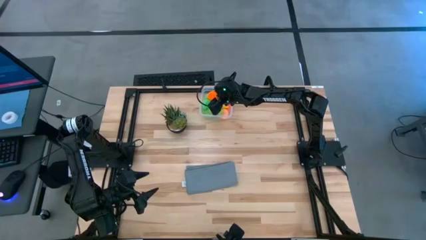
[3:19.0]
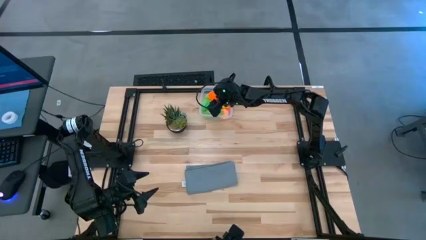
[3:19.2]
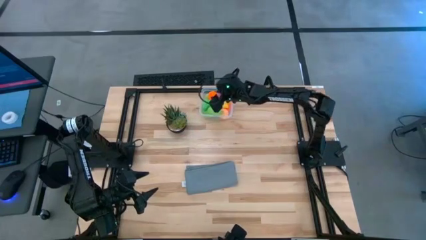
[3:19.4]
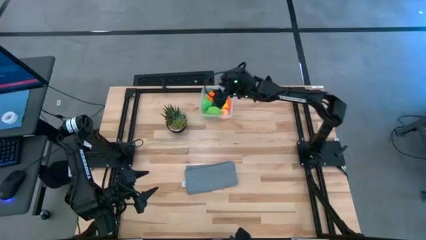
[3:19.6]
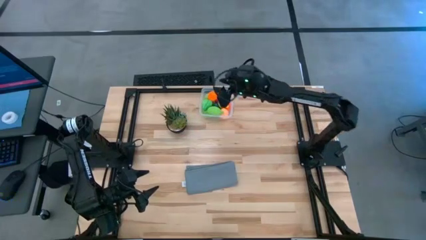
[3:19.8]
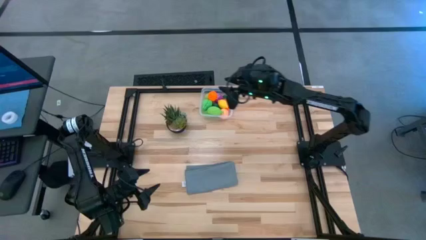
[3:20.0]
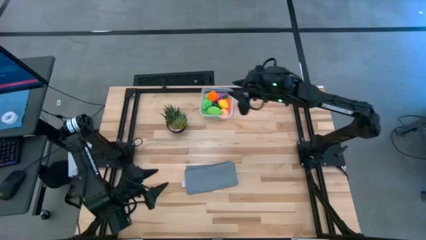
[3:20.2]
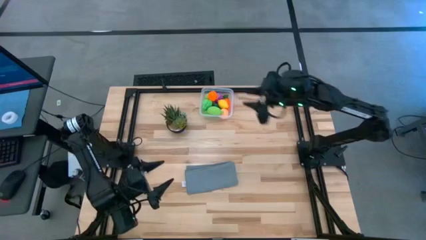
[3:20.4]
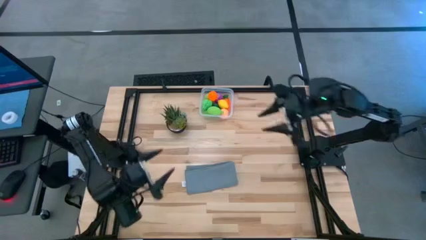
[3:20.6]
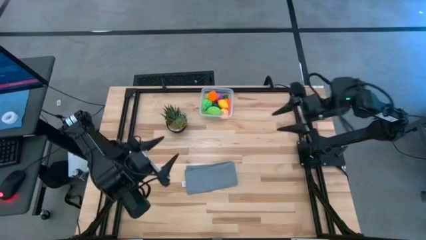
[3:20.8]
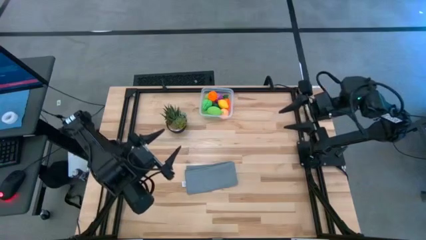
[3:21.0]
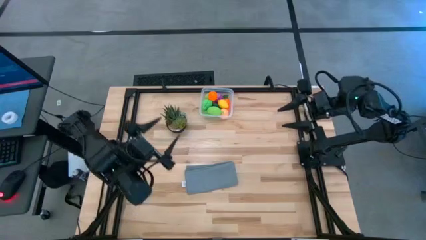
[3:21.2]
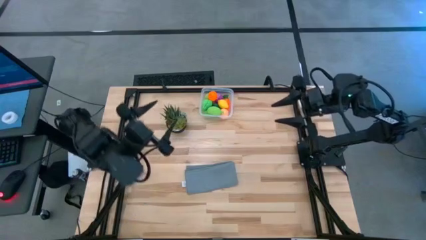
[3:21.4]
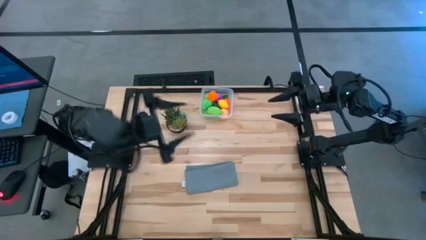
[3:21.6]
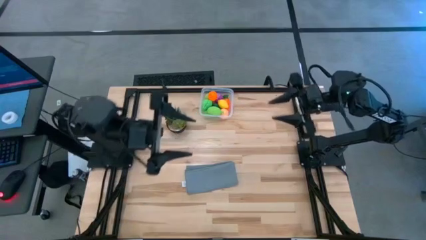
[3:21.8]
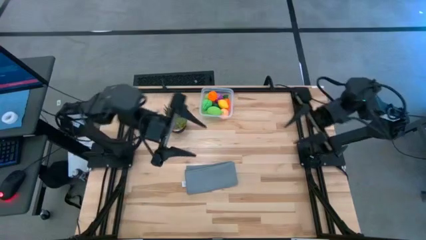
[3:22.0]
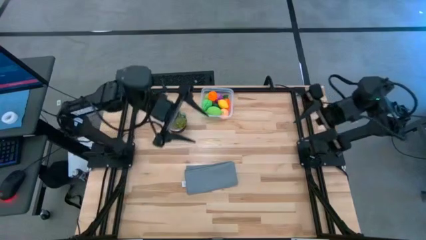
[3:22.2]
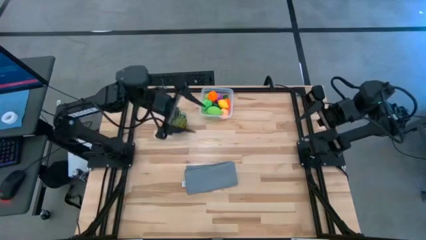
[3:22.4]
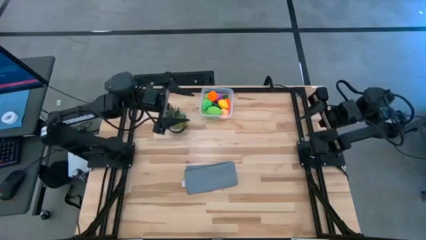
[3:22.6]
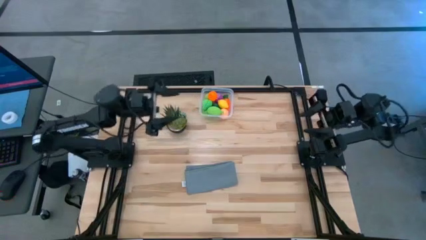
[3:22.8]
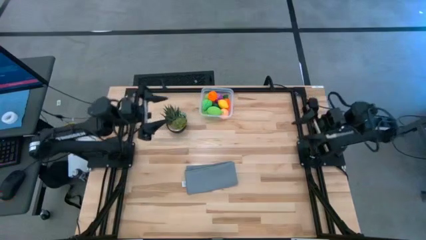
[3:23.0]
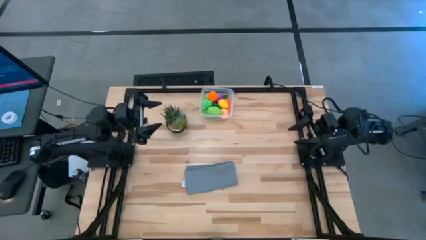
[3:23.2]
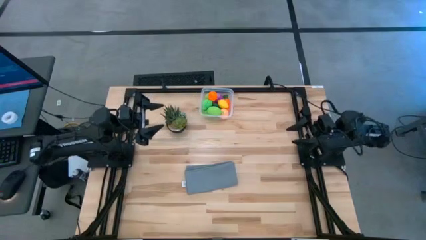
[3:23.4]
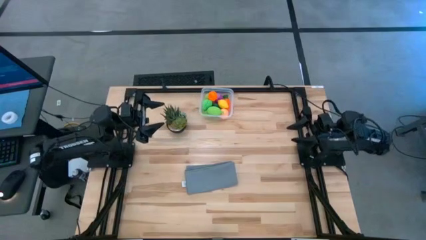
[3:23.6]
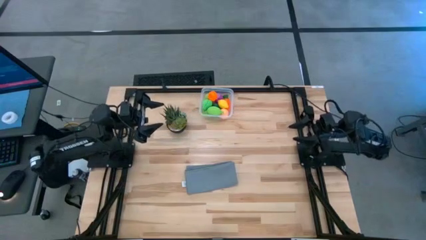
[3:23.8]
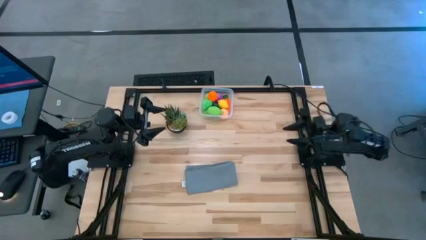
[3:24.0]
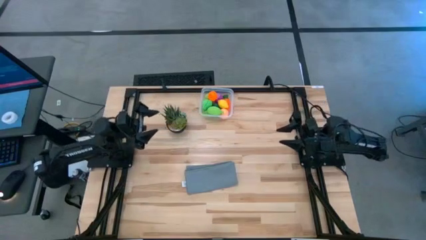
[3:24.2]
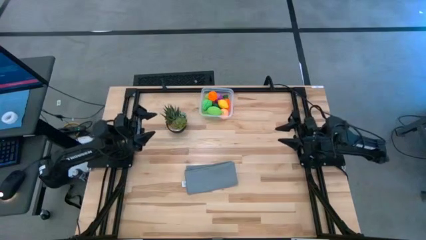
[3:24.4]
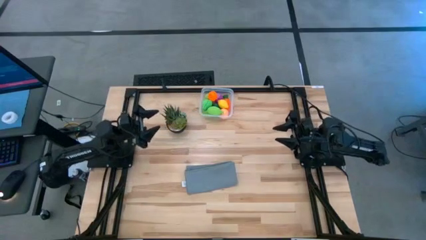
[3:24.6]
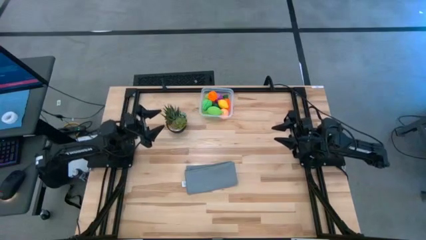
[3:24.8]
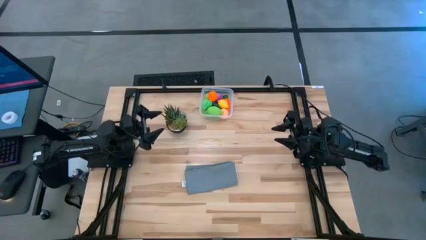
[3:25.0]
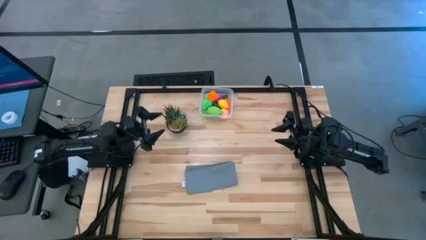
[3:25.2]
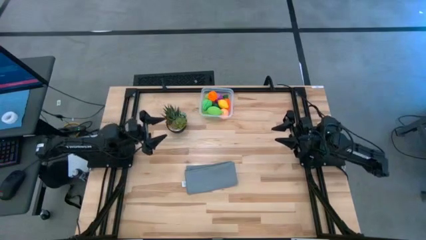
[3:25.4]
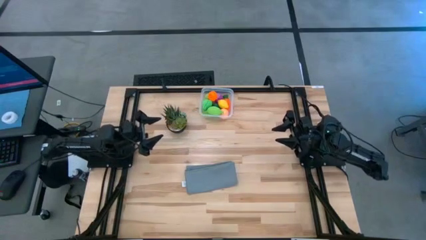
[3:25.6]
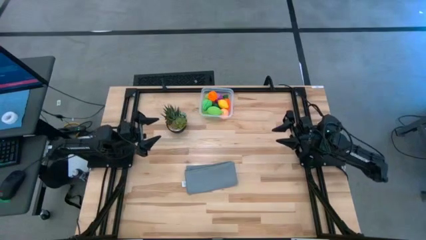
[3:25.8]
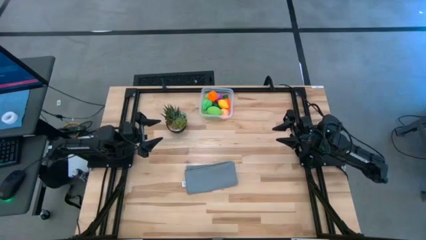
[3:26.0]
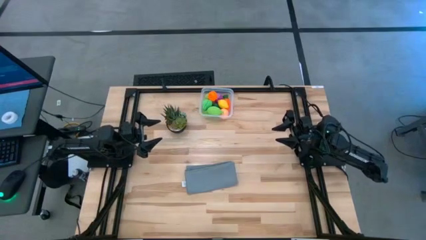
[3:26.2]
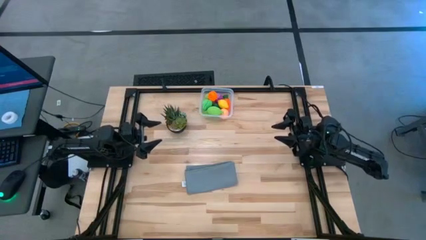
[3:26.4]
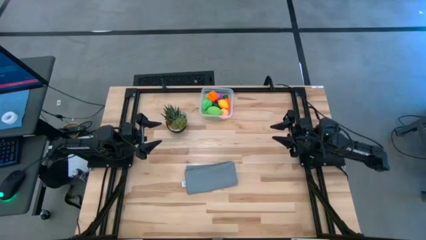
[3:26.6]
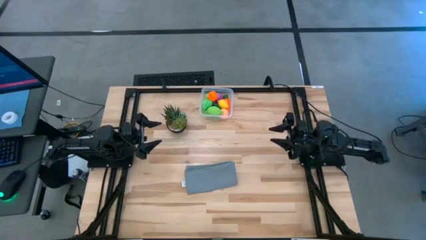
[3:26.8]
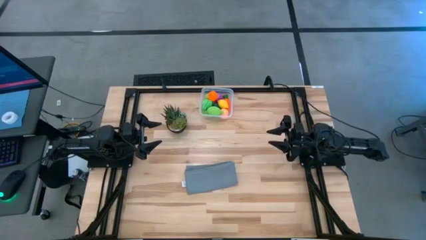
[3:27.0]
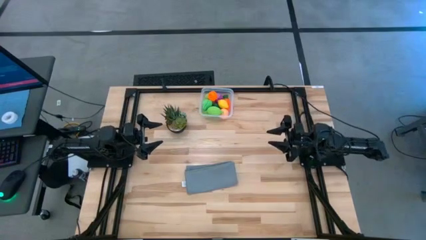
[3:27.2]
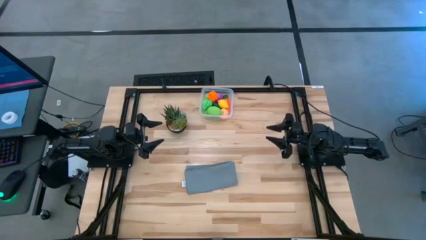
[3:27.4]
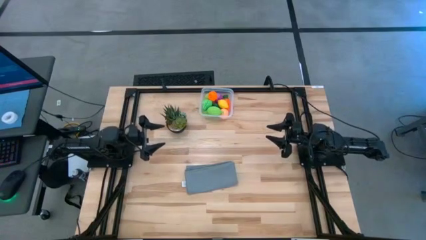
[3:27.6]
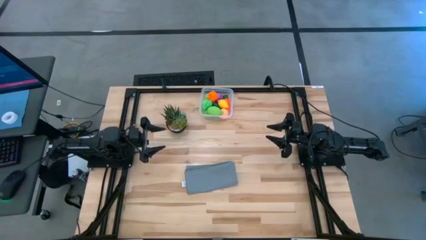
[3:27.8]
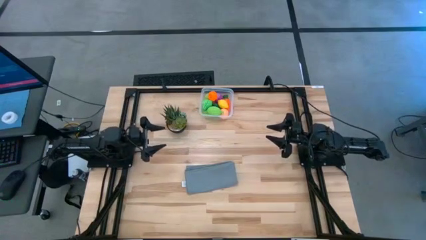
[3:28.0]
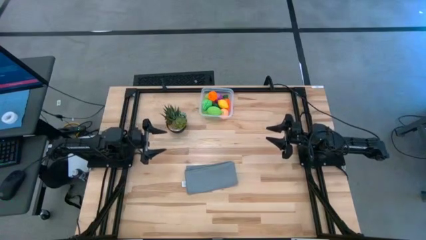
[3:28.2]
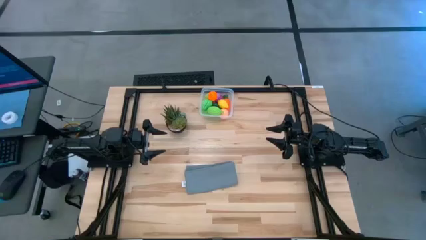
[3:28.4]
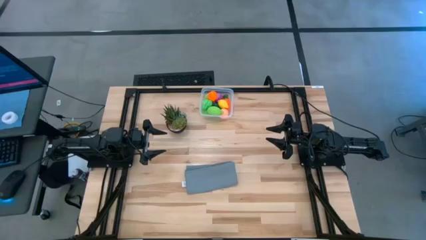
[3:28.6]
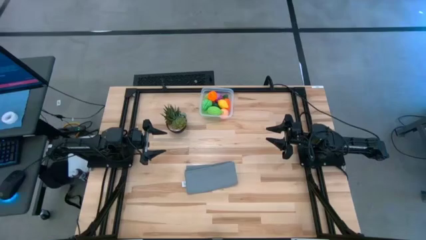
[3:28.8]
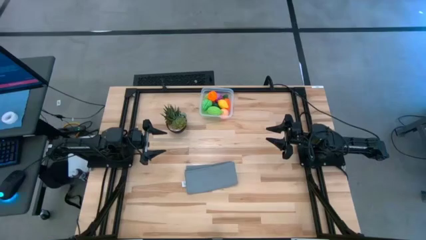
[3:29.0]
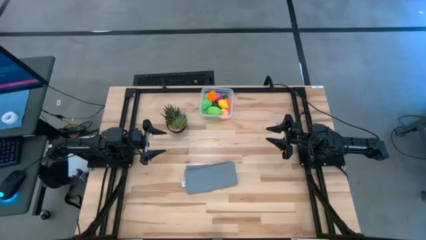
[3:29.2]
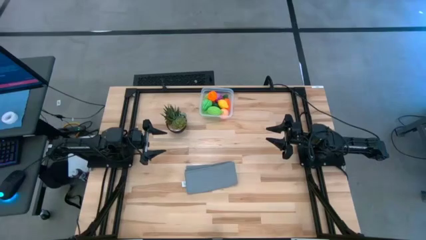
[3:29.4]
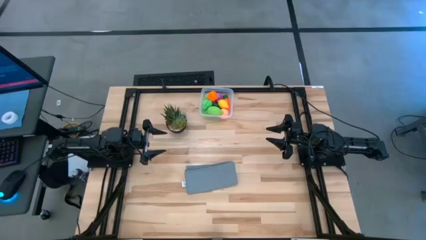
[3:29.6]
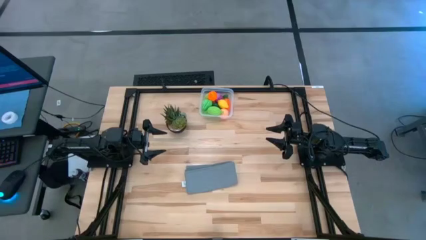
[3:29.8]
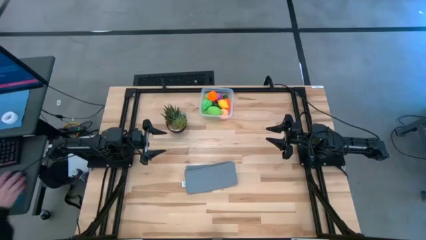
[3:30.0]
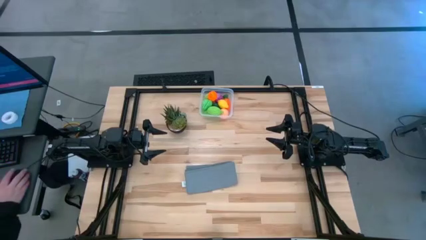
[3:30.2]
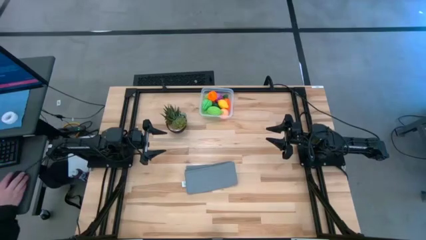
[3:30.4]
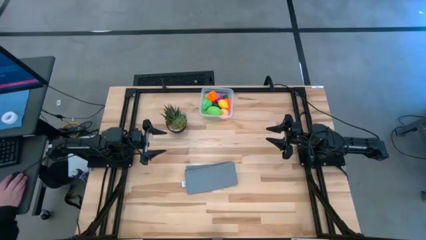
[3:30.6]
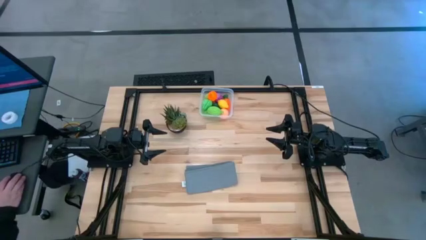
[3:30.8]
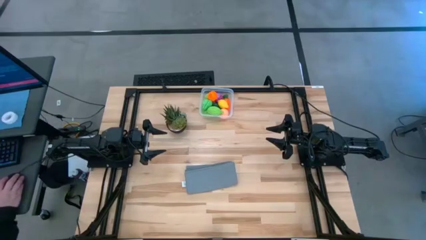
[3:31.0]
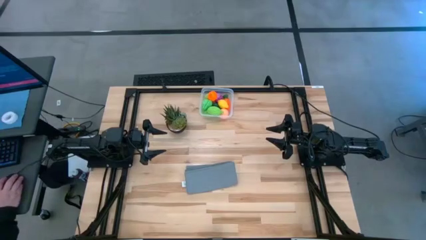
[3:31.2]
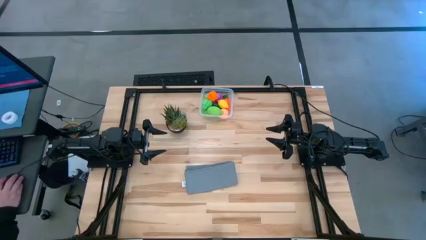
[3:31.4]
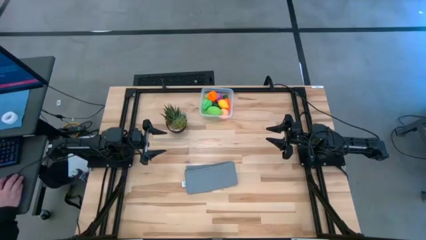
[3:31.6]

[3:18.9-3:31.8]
Task: Pick and placing Produce into tupperware
Return to Home Position

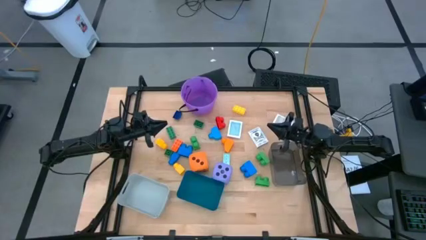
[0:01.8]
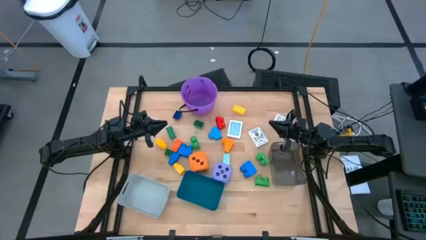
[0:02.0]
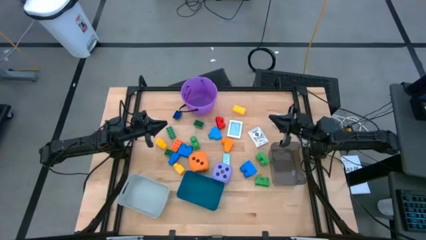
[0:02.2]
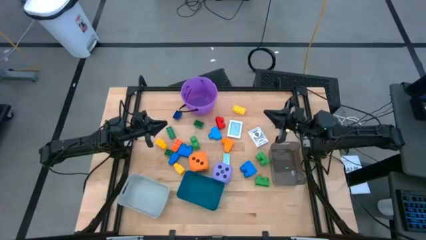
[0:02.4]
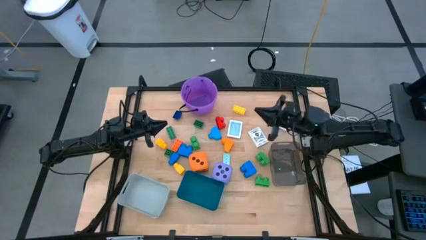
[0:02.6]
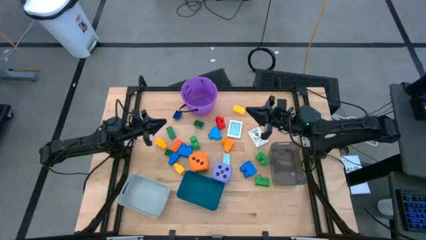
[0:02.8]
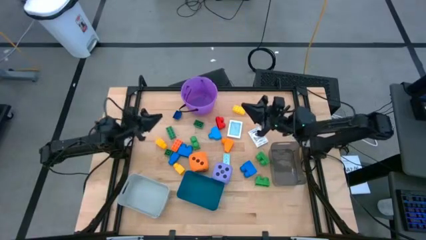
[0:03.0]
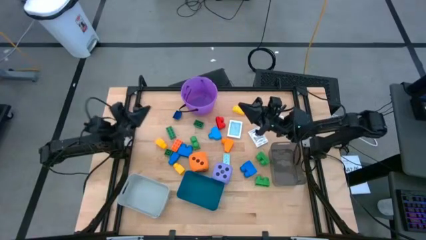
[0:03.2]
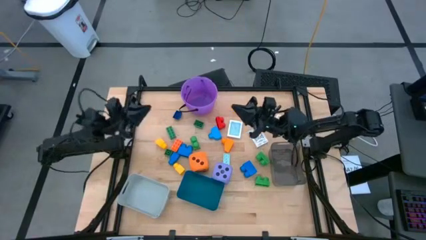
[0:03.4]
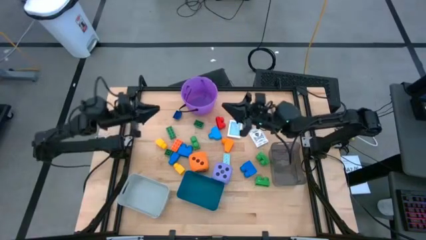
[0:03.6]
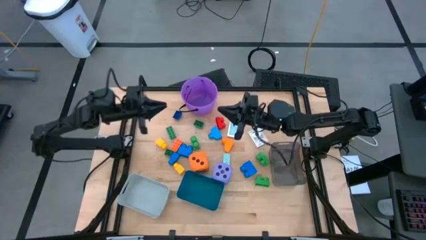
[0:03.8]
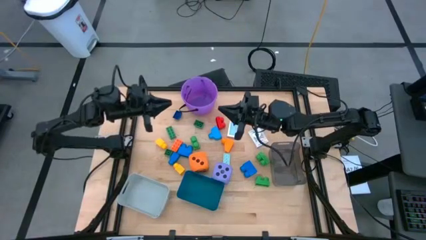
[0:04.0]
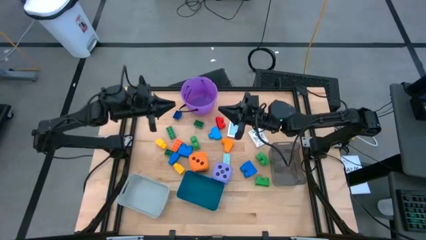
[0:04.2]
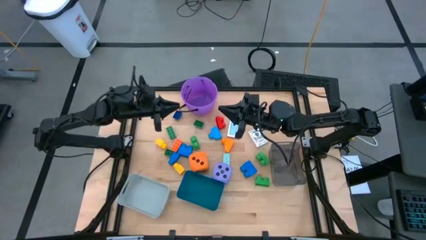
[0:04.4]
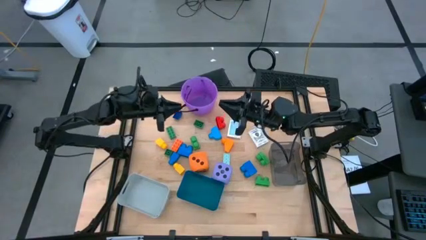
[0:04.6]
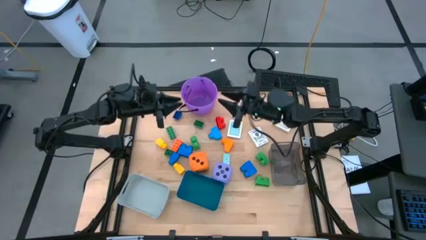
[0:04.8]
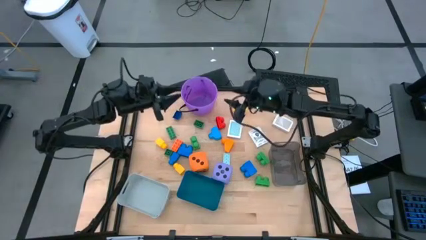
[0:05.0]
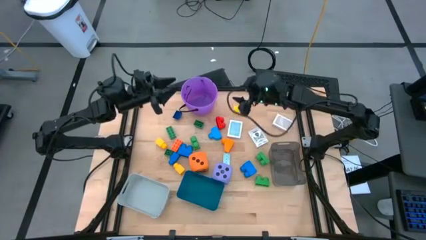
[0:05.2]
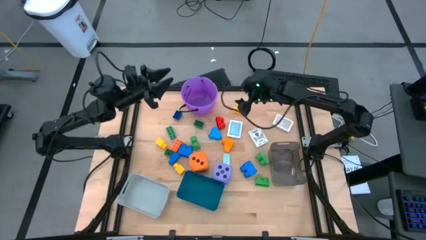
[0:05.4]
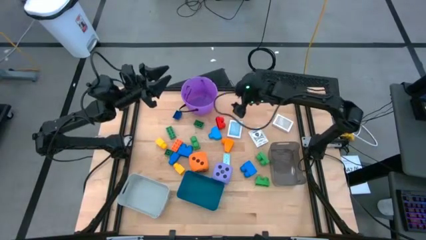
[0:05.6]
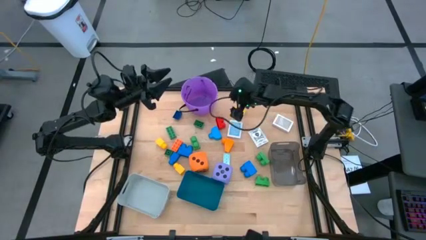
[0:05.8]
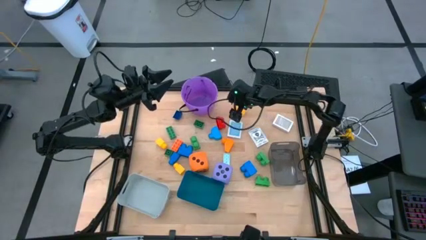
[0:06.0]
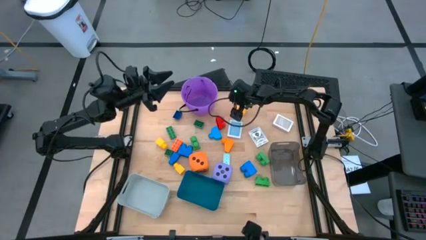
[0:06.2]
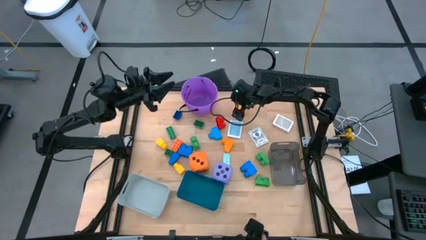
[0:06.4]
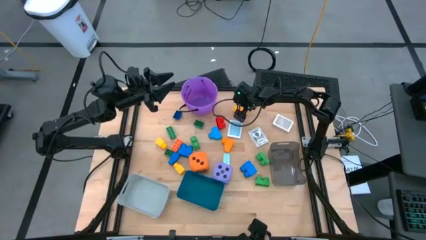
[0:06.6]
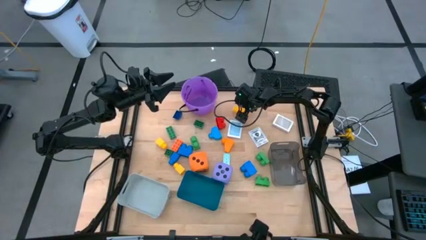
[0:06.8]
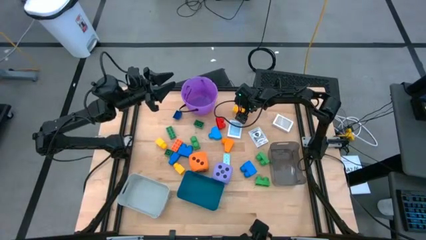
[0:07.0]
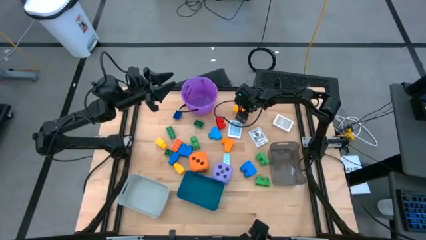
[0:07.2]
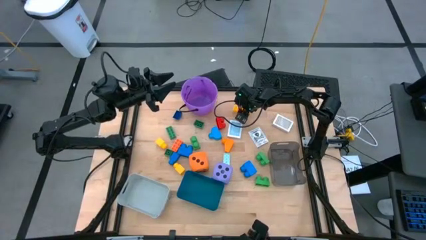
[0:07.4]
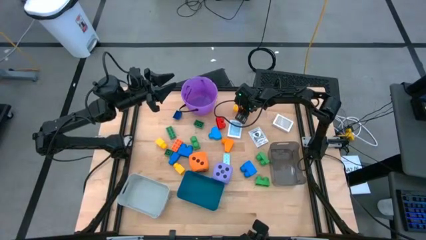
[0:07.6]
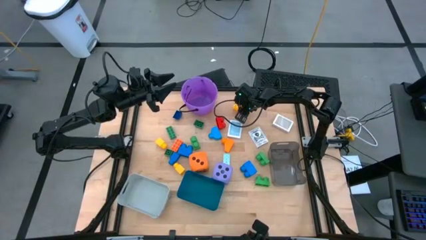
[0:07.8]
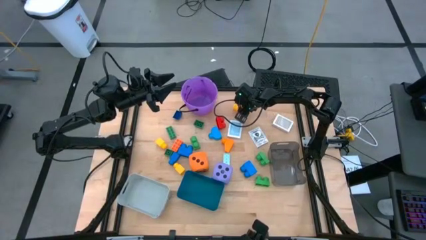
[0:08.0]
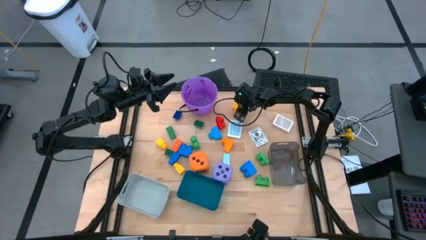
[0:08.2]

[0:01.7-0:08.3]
Task: Pick & Place Toys
Put the yellow game piece into the blue bin
